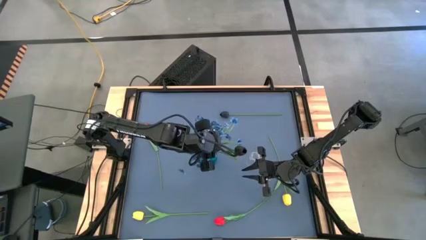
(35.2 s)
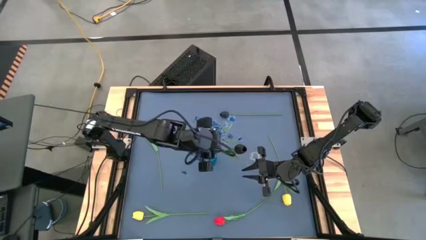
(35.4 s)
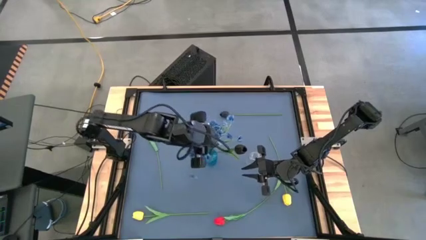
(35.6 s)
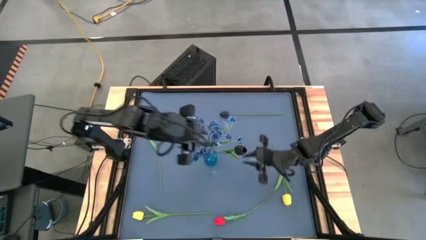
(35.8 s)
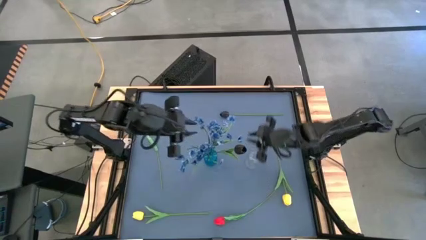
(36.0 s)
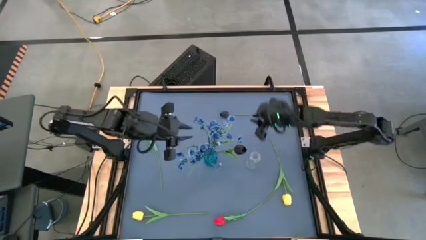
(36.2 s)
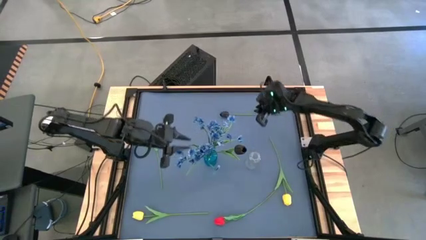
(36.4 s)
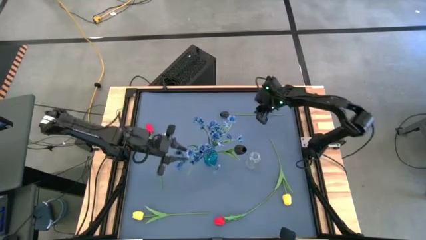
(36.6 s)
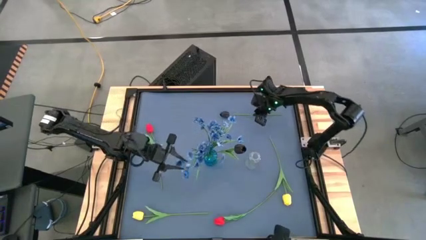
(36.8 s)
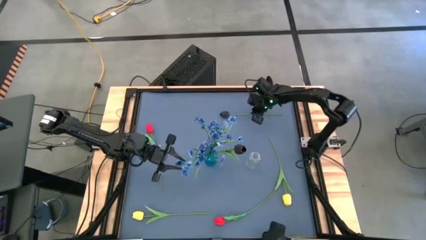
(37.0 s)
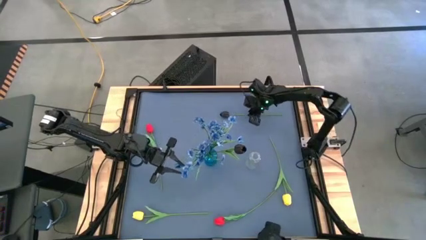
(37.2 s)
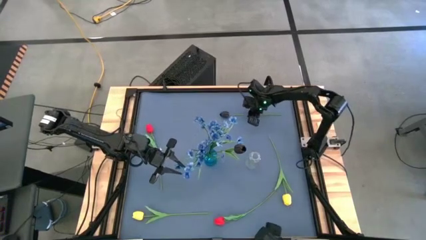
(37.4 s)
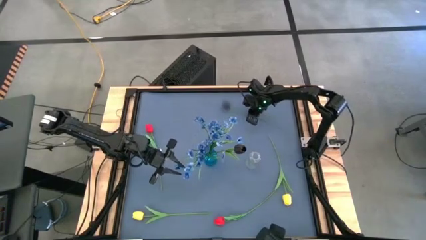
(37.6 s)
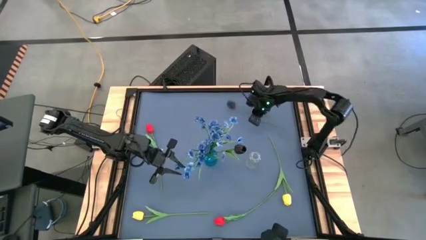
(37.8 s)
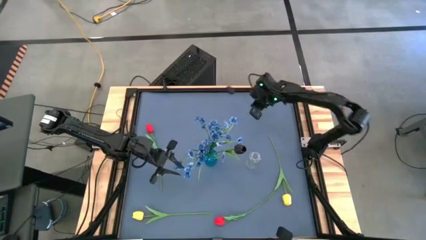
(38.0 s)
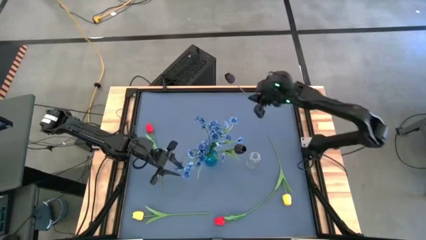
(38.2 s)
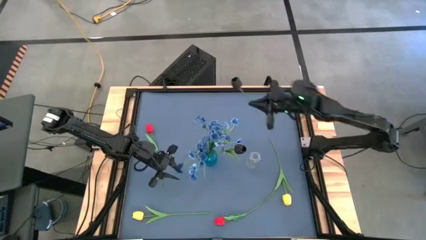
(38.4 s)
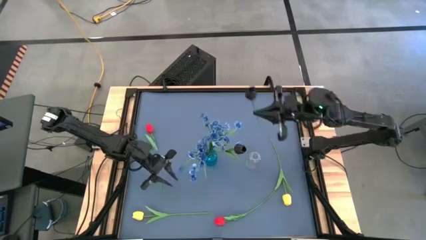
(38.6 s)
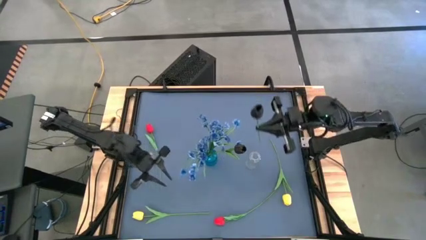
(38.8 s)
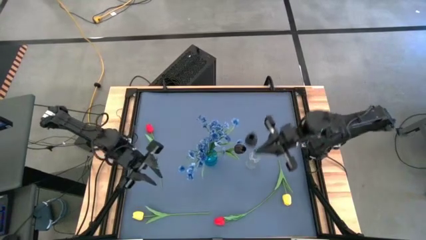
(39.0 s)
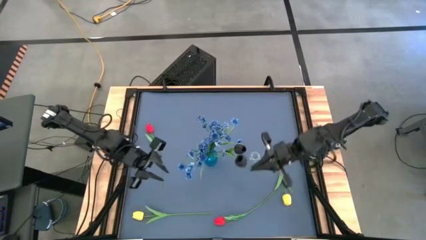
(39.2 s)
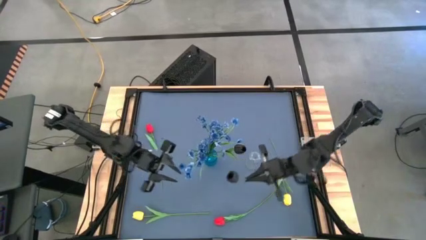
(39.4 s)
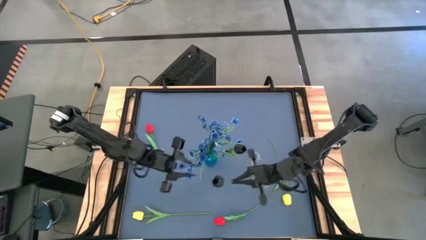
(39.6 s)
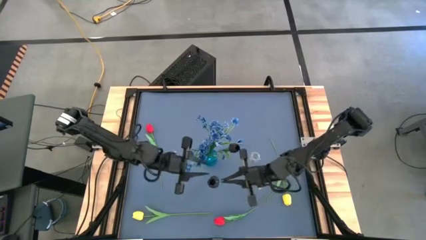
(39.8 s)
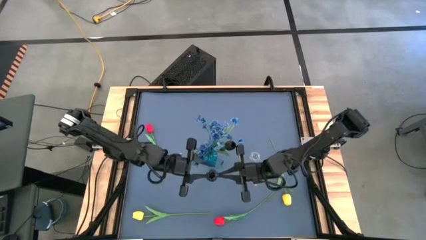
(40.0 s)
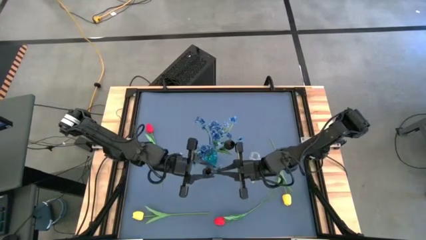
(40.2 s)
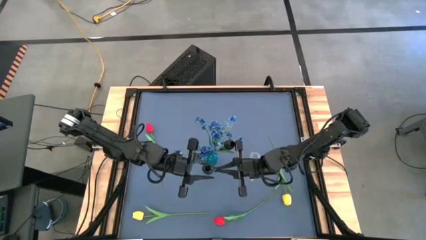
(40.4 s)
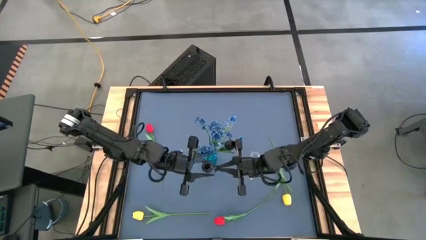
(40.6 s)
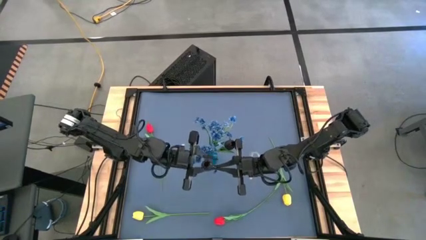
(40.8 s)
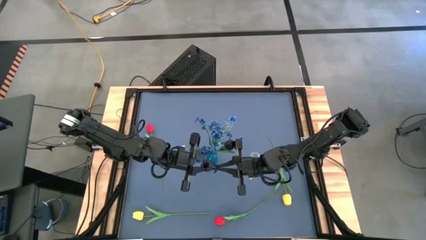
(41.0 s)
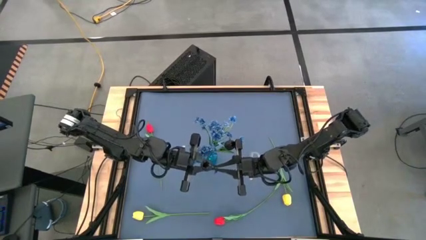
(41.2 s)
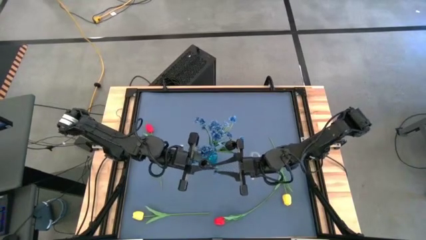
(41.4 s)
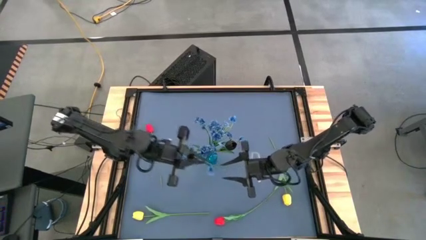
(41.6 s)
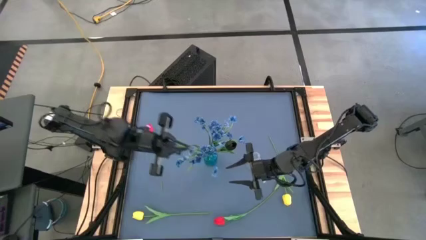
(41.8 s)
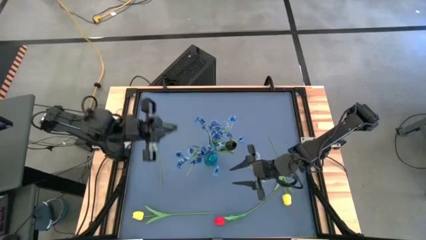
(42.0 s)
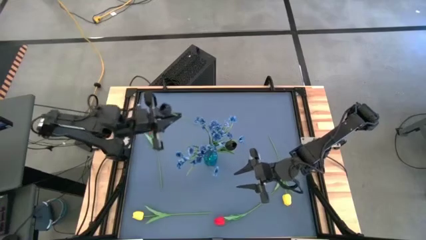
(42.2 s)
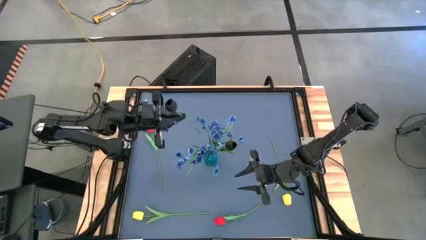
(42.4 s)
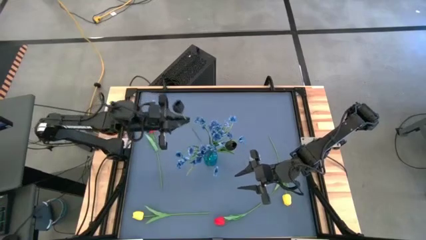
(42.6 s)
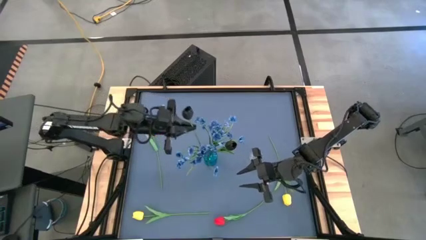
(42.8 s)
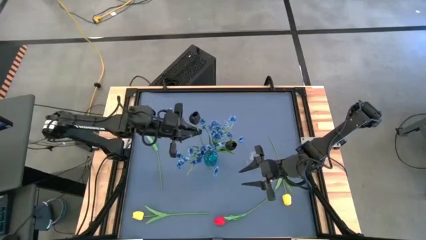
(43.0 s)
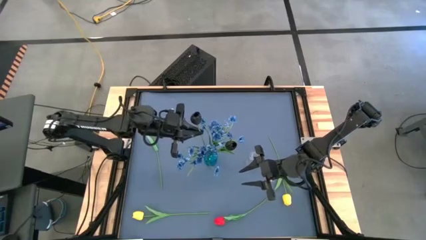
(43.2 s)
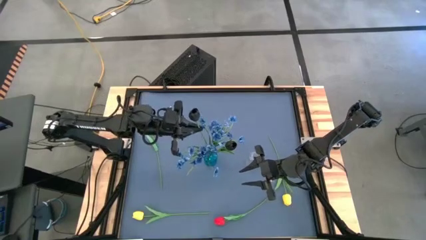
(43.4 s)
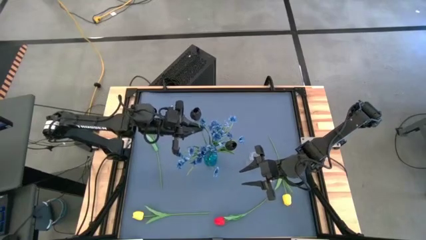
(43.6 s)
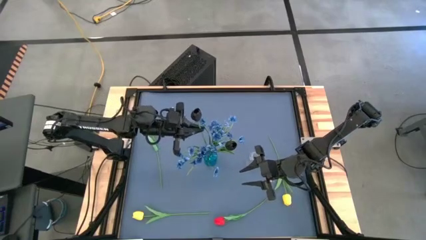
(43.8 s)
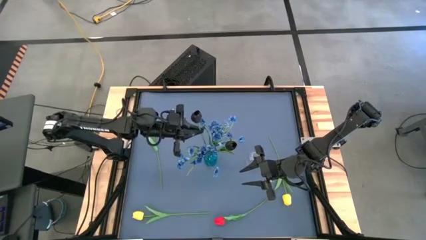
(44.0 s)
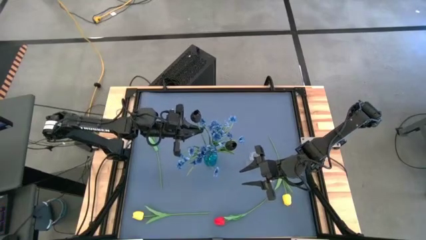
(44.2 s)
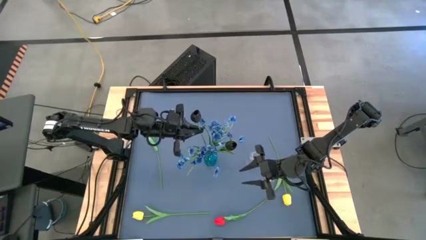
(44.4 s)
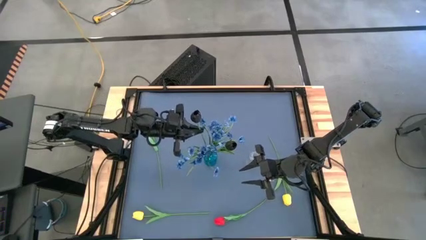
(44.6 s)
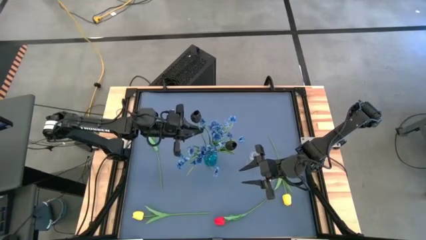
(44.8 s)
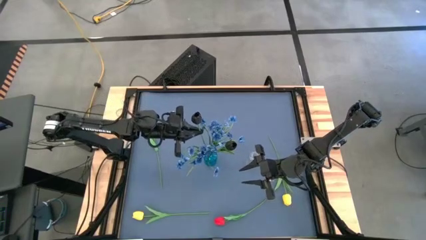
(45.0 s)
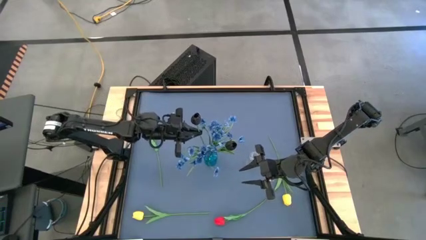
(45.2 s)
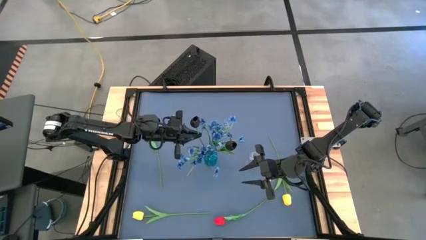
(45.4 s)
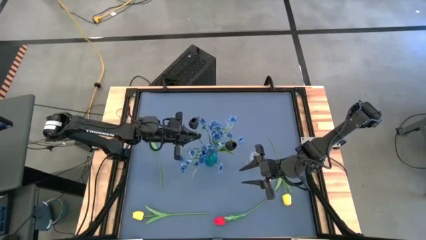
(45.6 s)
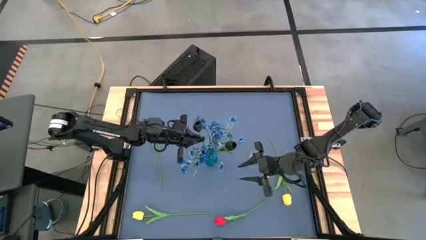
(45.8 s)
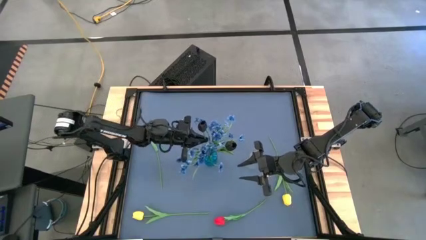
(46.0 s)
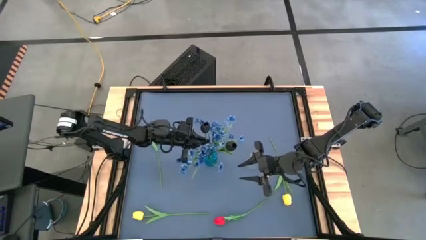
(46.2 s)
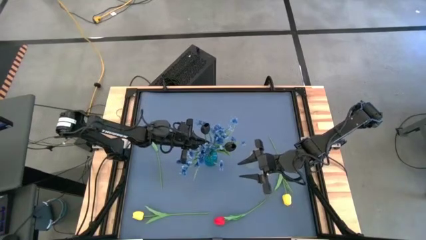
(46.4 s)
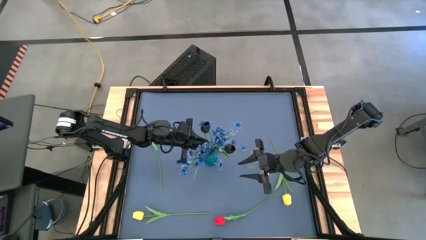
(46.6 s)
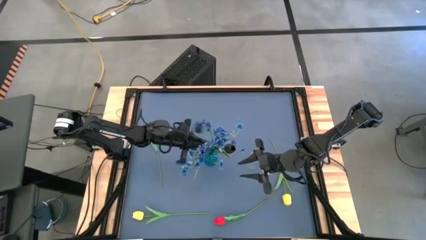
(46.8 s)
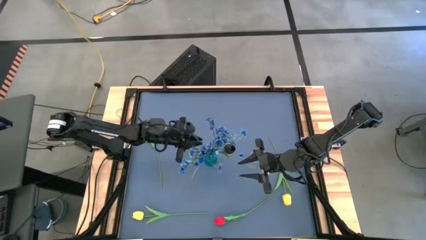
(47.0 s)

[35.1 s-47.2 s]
Task: Sort flowers into vase by color
Put the black flower into the blue flower vase

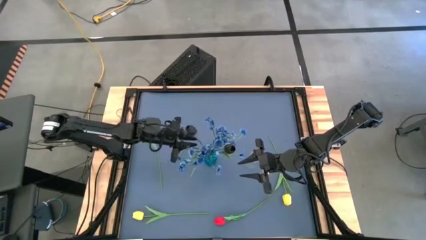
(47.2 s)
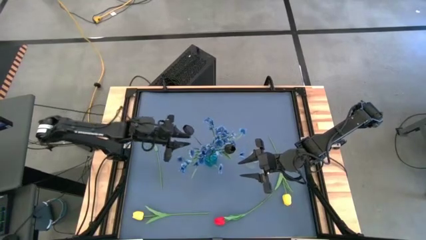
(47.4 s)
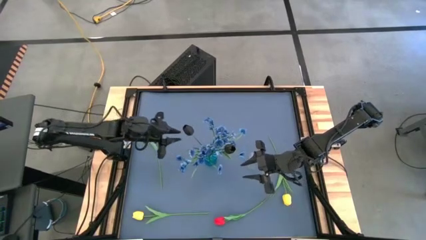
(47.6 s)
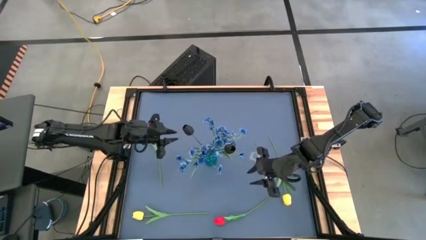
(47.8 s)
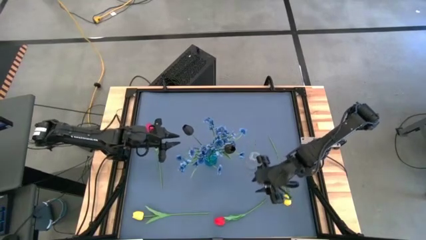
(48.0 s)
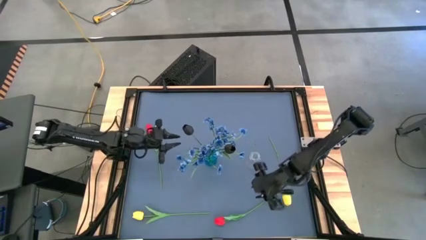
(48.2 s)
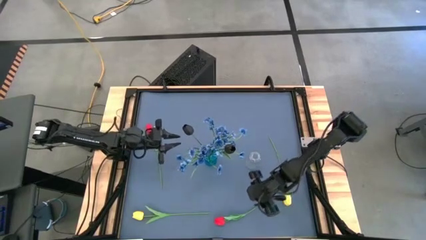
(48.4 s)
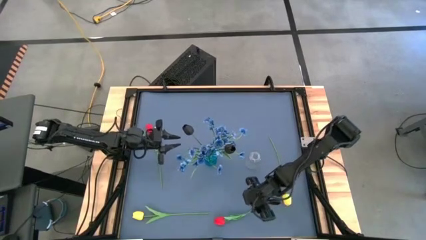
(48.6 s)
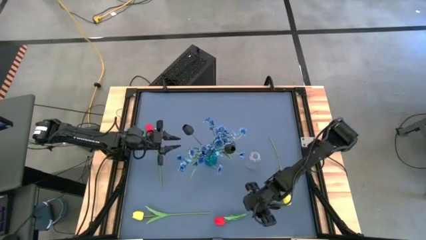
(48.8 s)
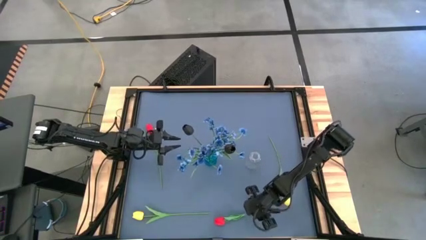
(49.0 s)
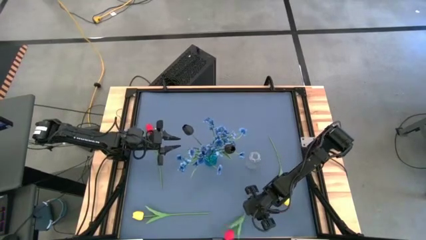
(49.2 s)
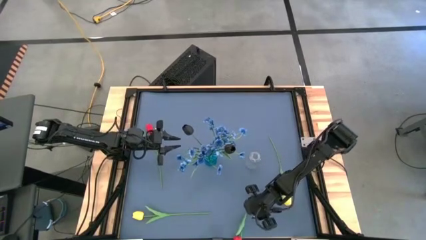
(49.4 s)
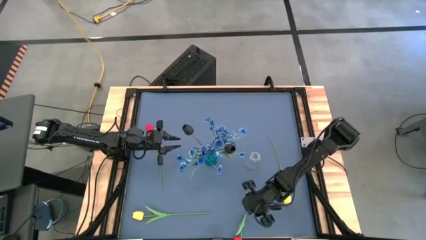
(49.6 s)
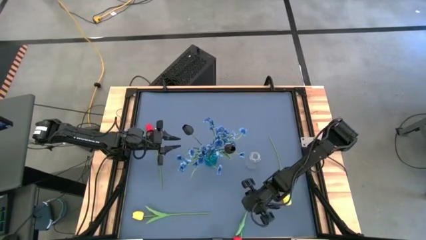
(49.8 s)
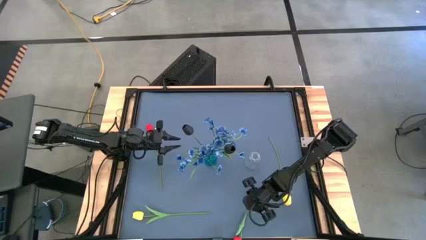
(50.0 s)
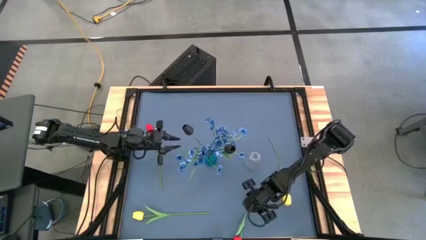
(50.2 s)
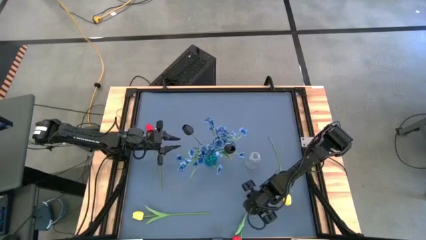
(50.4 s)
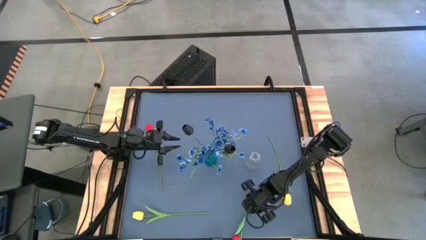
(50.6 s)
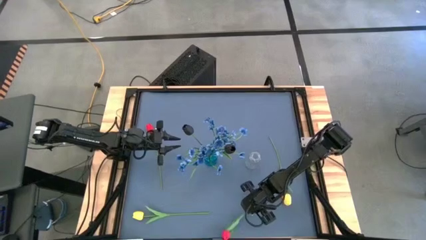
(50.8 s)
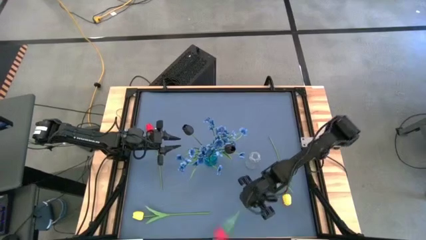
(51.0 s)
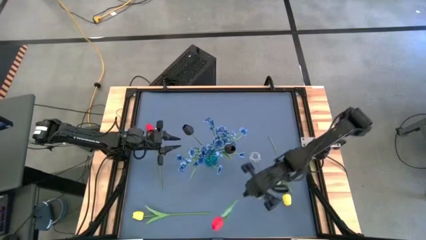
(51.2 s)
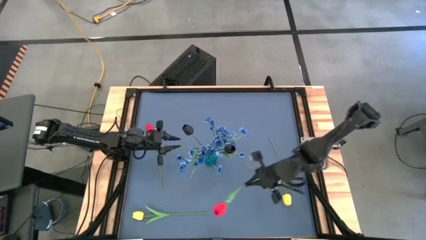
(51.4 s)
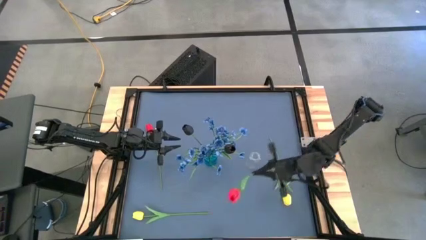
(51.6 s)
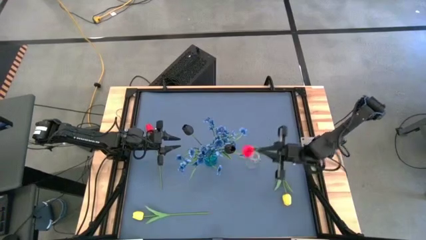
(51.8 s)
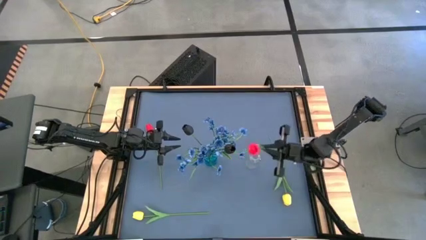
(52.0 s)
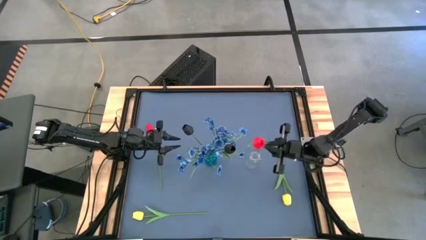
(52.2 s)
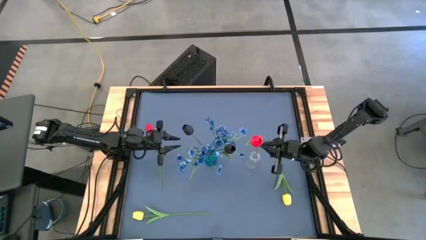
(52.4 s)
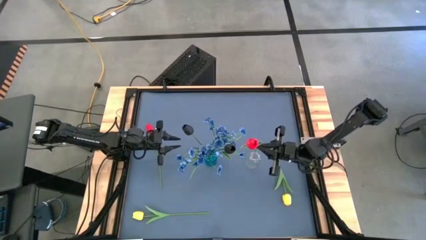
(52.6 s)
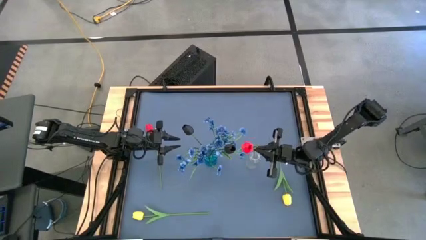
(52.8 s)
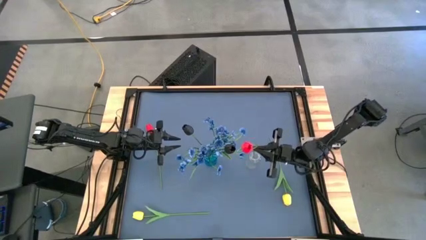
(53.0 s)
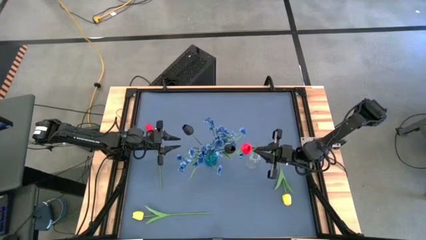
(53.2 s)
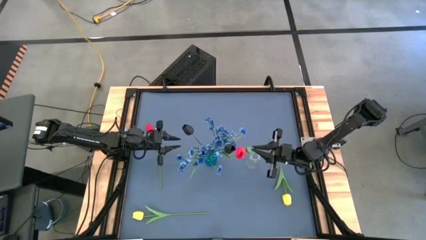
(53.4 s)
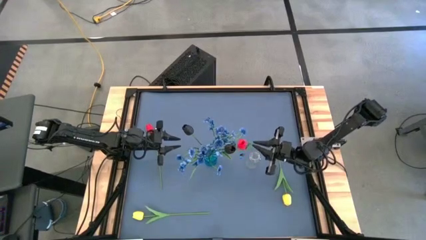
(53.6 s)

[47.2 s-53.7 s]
Put the bottom red flower into the transparent flower vase
